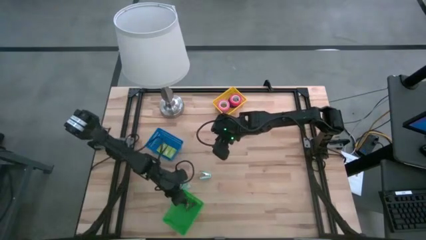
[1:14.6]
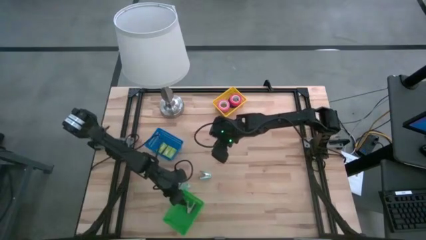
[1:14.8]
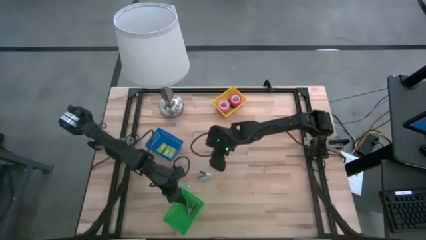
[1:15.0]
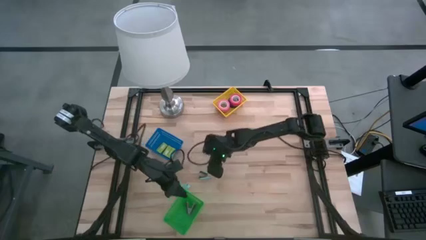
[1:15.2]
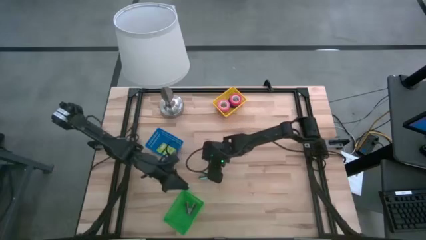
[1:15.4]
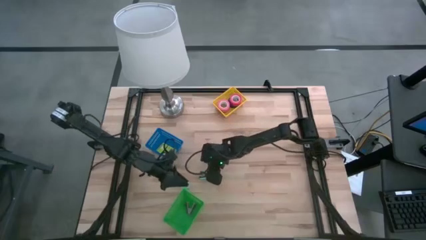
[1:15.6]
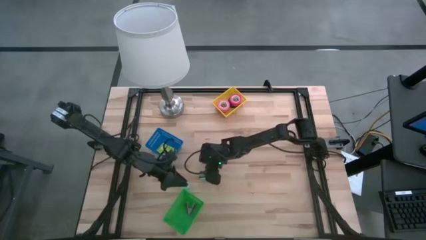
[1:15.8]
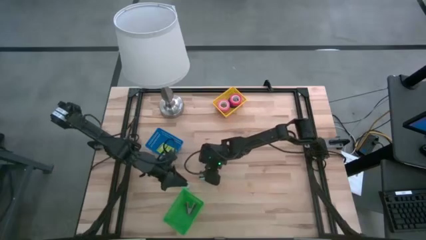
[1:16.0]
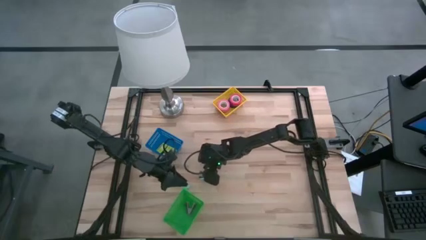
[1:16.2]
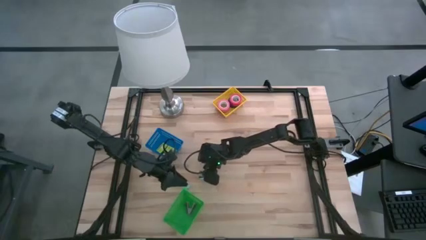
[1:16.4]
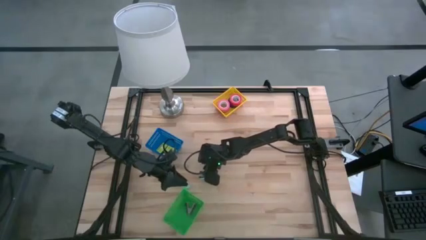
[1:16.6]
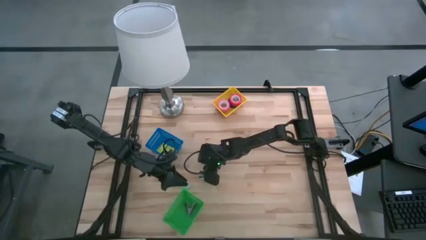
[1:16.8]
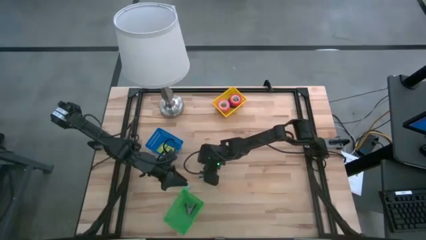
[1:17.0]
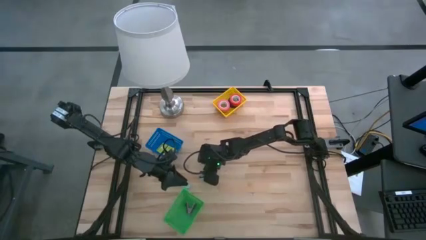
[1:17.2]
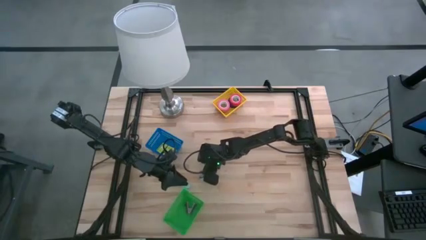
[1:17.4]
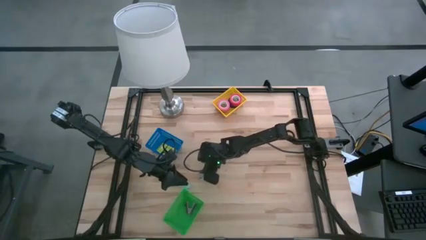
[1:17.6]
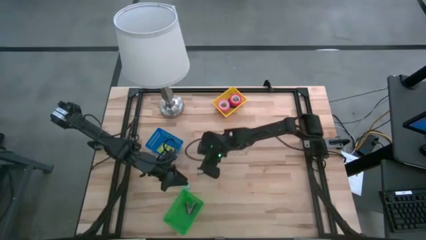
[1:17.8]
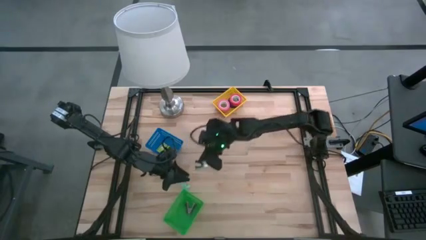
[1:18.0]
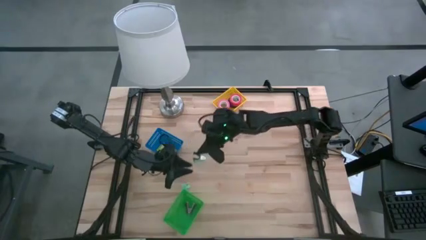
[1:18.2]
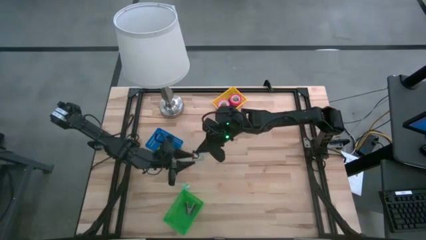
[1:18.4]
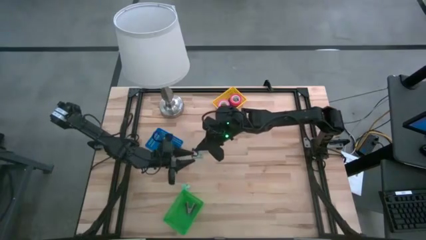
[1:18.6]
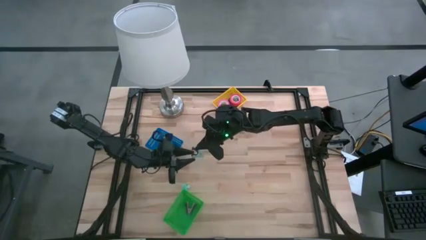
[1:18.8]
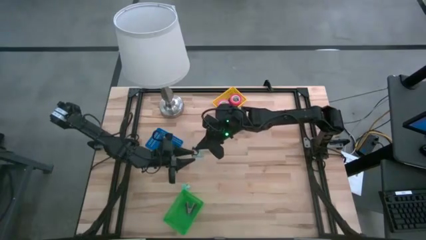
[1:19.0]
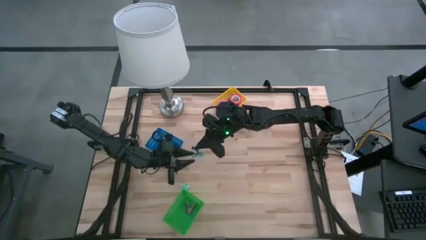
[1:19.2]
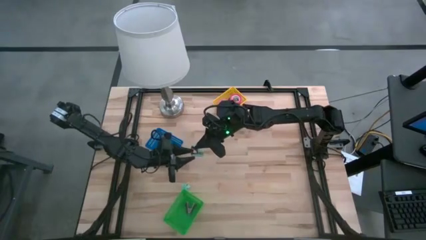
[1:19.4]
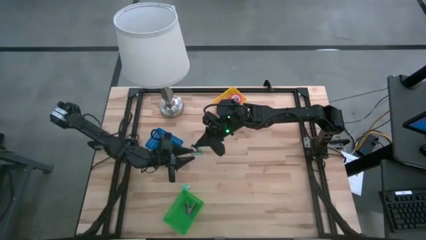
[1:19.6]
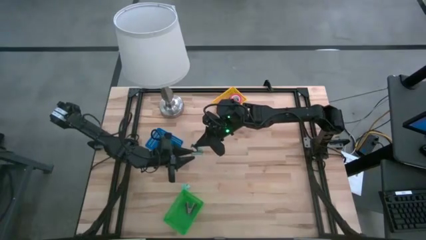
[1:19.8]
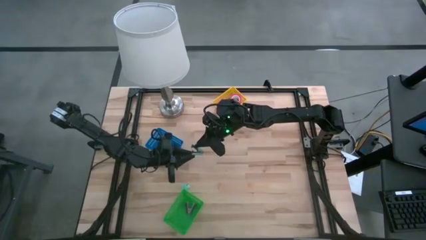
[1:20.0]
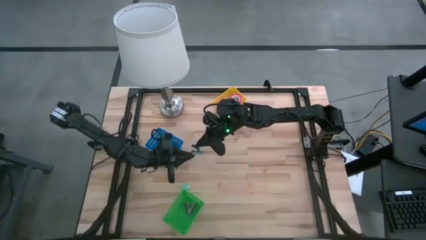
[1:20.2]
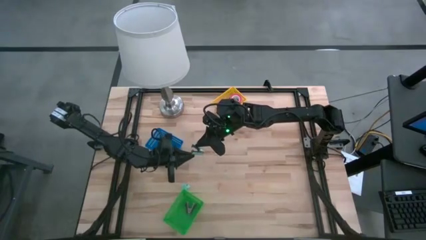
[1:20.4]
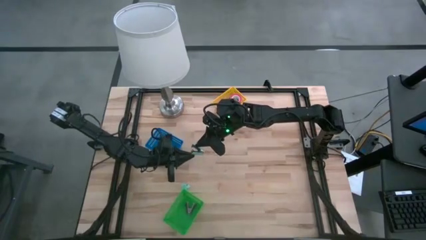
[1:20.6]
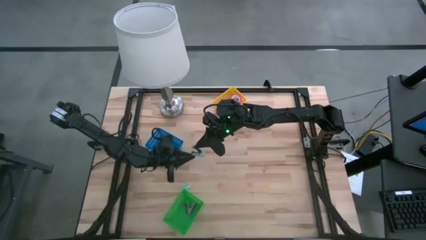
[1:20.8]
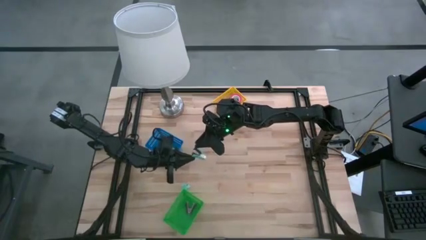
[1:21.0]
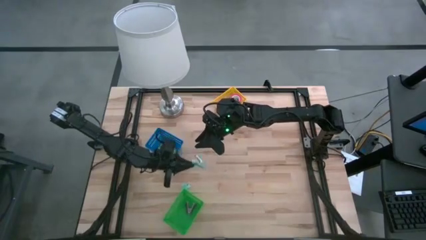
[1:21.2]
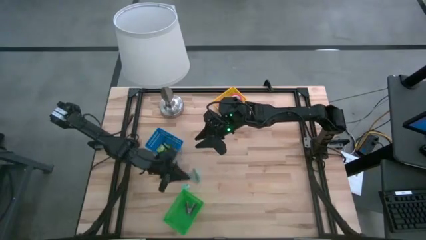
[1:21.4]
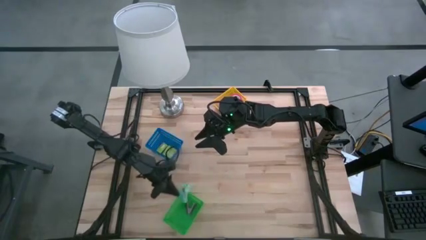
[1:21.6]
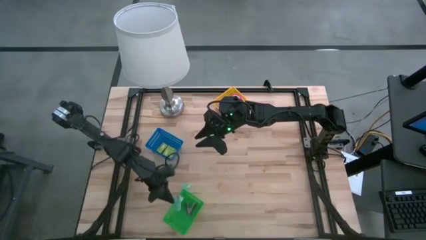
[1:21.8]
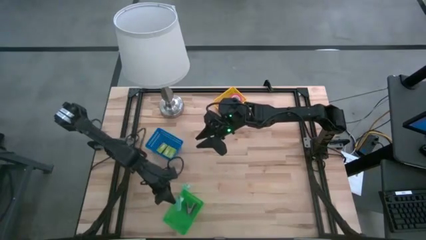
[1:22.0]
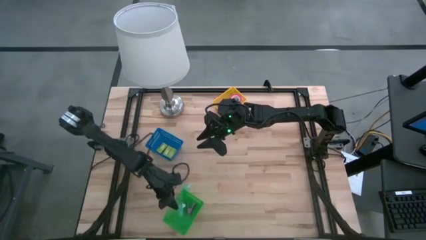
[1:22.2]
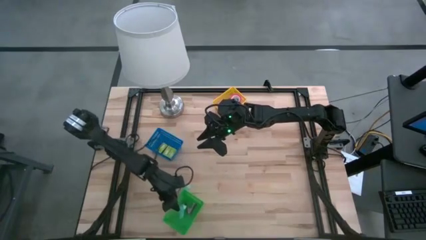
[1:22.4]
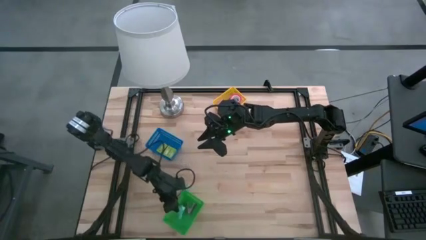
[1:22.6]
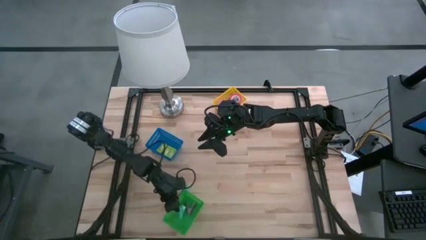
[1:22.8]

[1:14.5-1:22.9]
Task: Pick and place Stapler, Stapler remover, tape
Put the top blue staple remover into the green bin

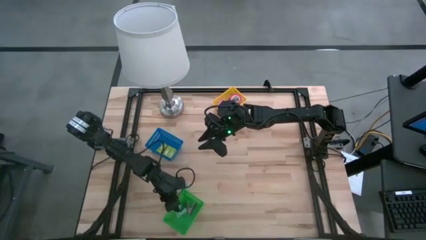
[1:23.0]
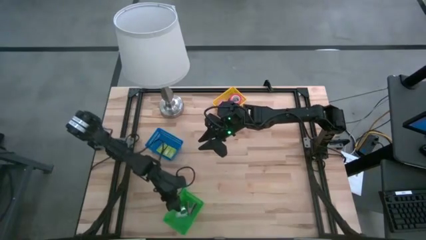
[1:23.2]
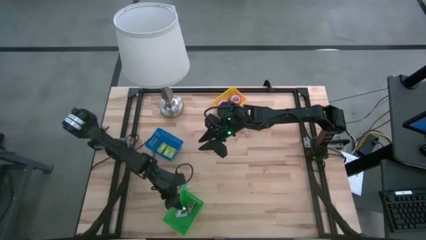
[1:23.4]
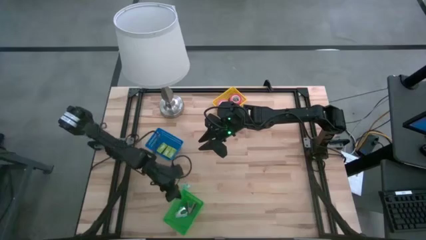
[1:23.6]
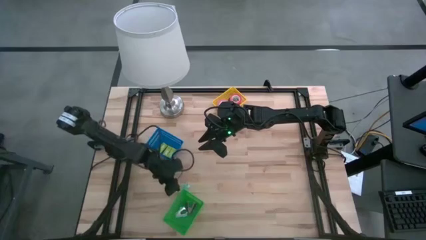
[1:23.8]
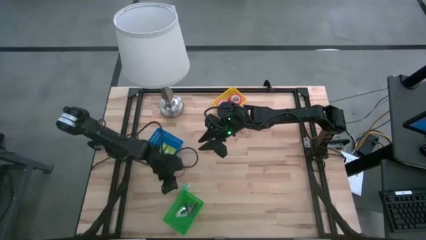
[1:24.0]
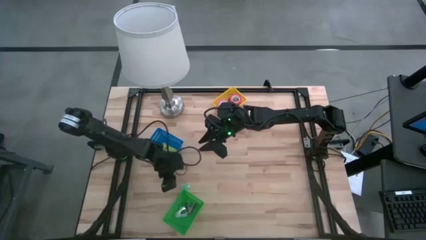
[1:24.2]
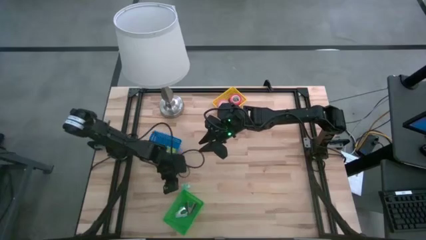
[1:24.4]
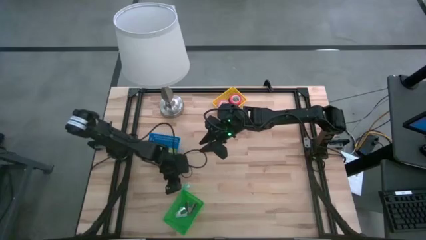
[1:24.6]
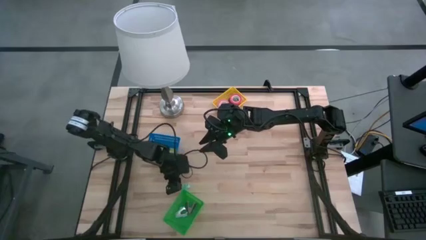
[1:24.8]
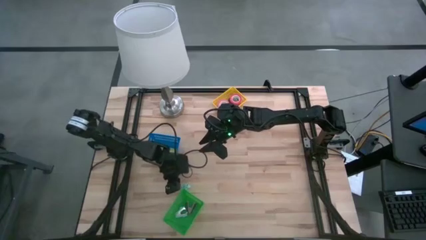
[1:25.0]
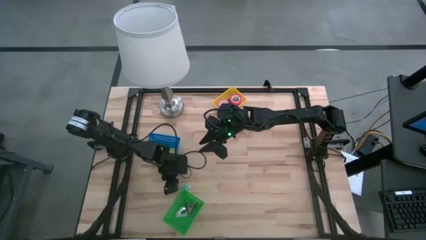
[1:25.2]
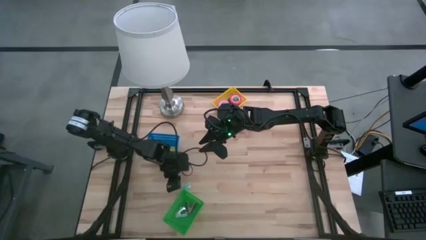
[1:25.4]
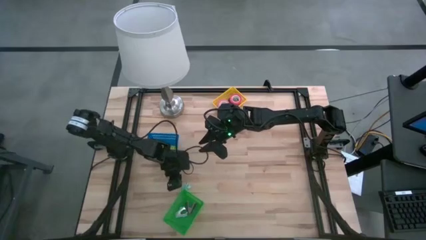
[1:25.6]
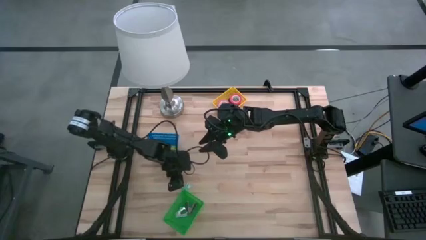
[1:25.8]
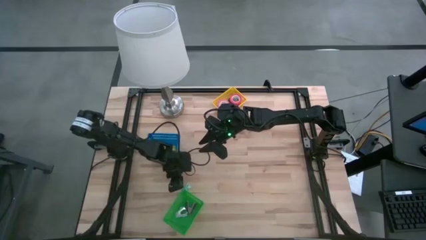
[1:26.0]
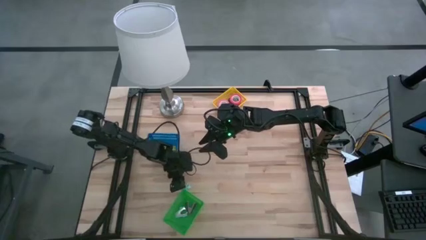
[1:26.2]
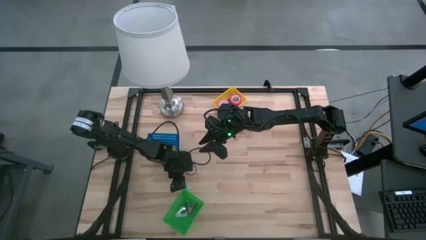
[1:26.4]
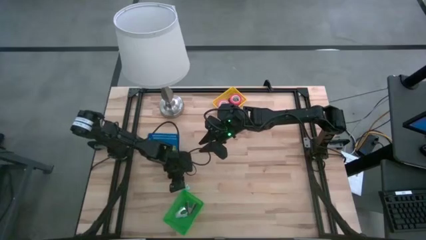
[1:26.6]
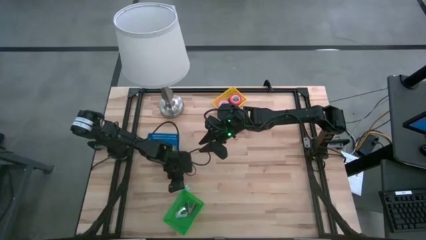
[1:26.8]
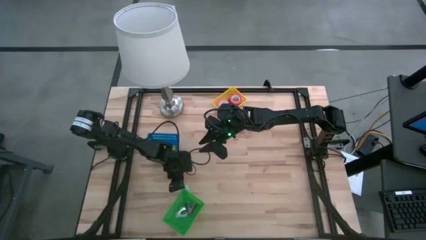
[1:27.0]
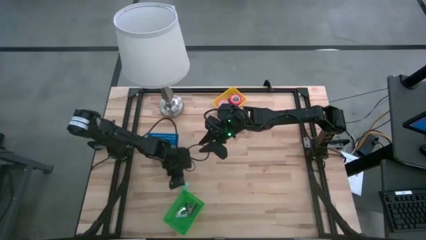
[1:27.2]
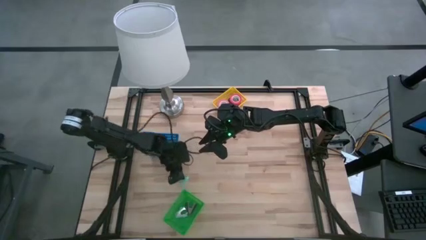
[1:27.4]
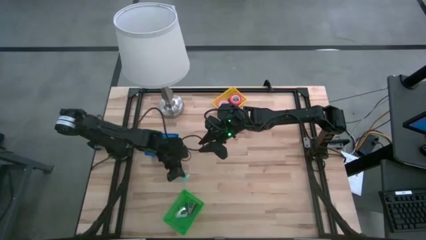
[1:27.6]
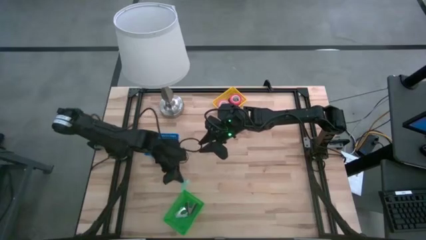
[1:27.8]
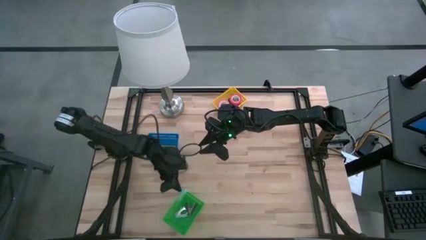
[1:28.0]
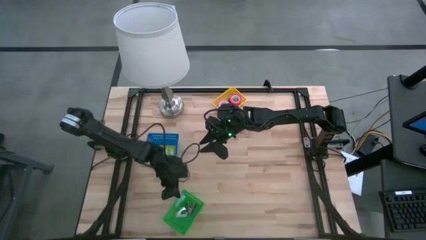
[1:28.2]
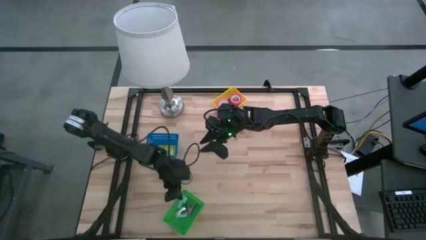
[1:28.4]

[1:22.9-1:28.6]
Put the blue staple remover into the green bin

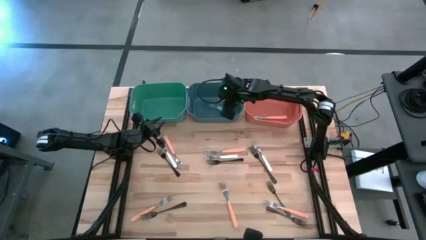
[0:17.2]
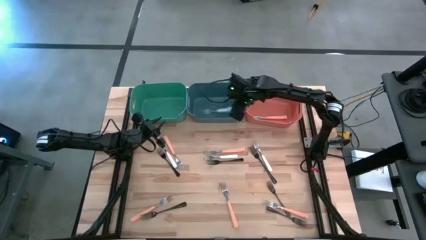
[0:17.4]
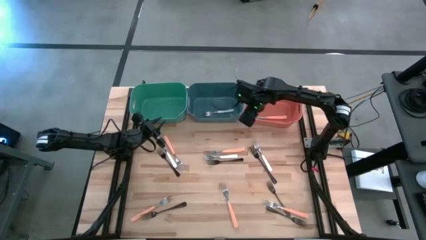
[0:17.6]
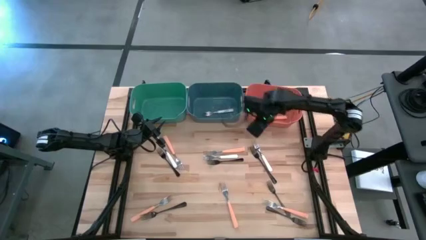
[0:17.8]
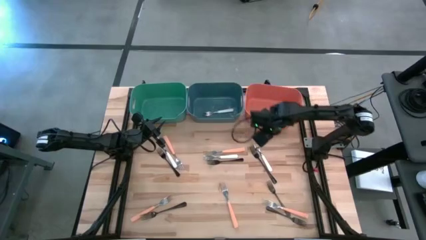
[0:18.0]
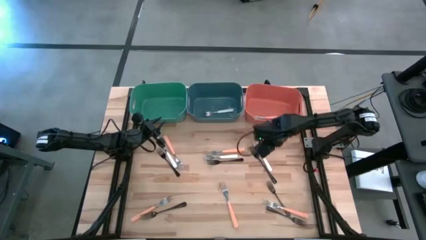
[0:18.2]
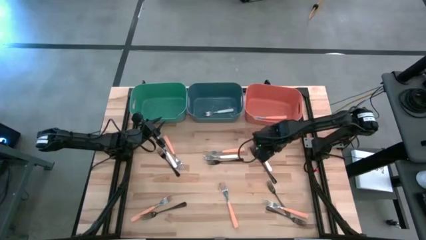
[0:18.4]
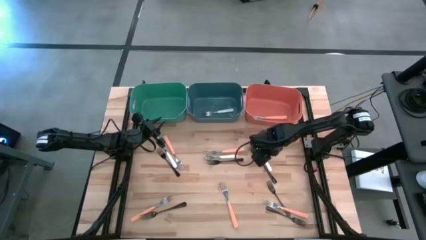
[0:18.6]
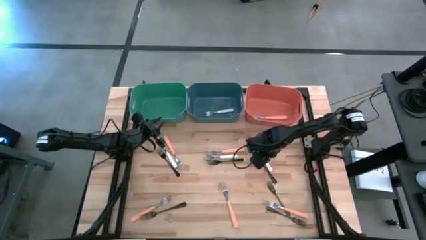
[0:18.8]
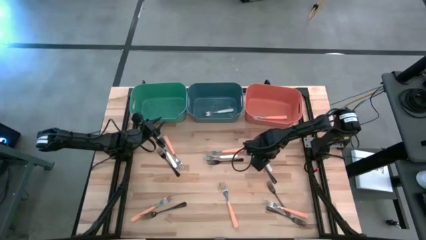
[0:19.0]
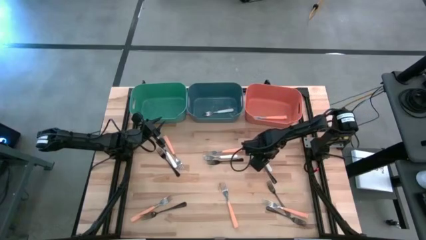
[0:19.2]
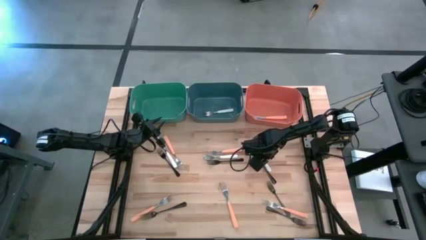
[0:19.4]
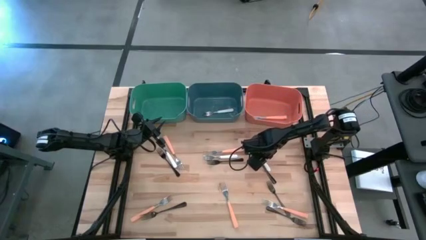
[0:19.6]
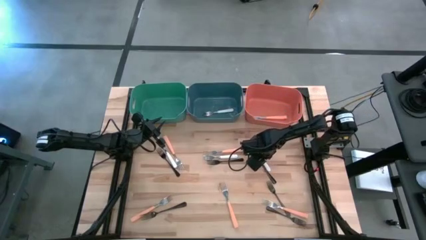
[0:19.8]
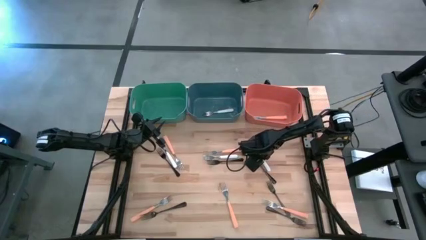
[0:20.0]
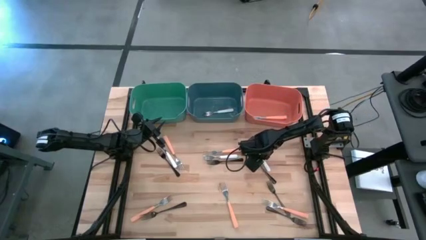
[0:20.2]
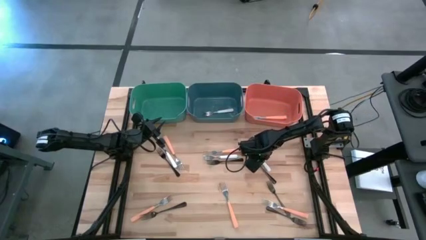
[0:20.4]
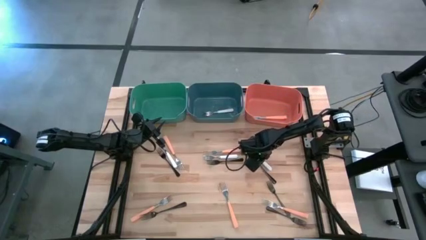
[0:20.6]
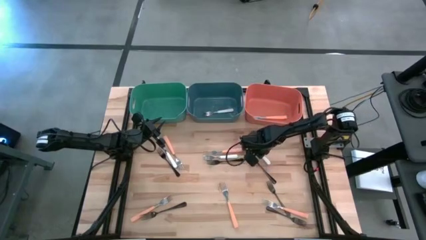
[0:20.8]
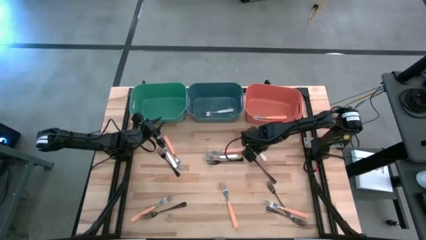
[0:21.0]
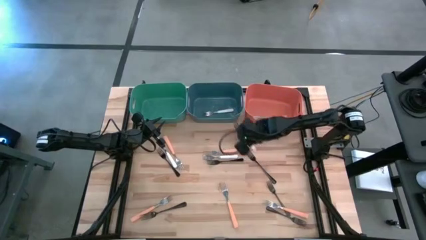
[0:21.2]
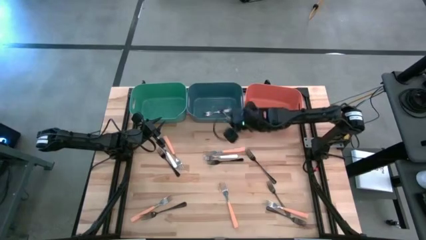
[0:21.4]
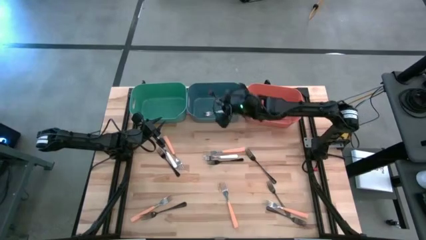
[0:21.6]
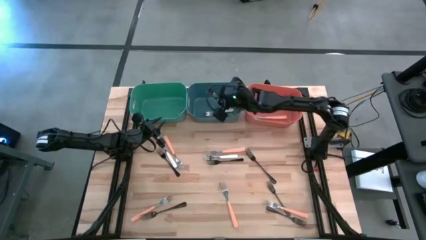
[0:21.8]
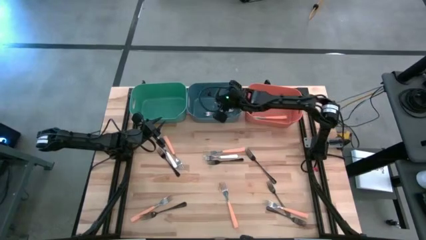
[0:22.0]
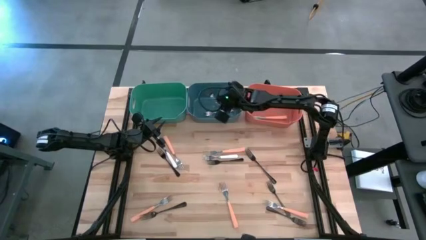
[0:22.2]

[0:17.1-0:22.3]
Task: Sort silverware by color (type)
Put the white fork into the blue bin
